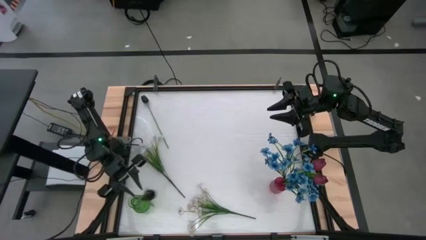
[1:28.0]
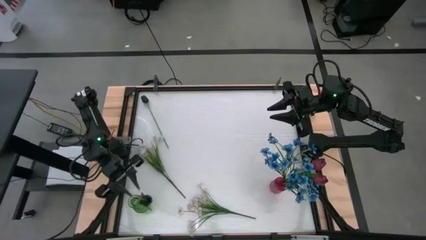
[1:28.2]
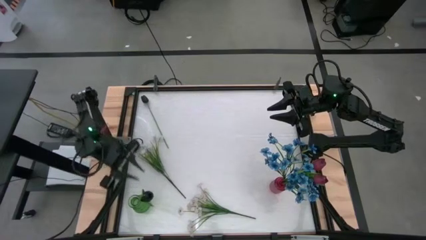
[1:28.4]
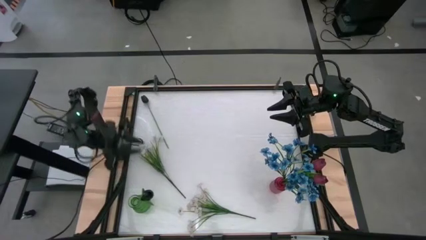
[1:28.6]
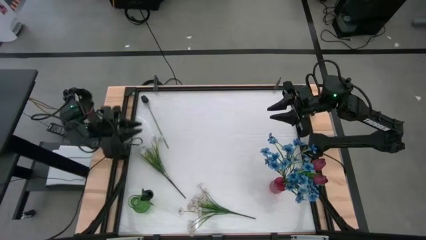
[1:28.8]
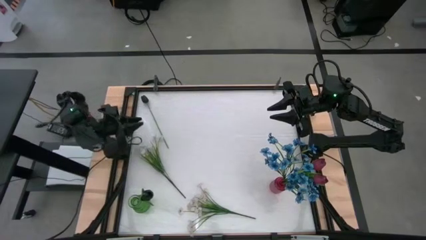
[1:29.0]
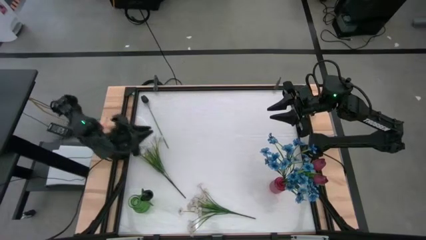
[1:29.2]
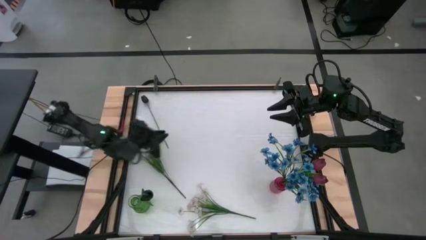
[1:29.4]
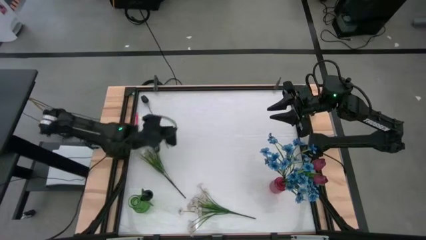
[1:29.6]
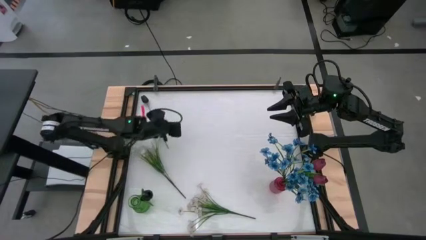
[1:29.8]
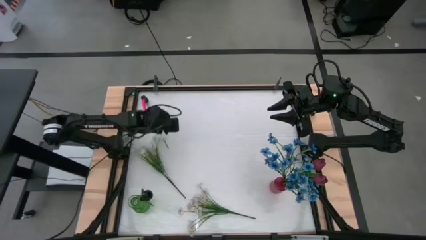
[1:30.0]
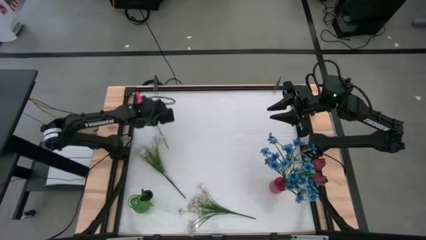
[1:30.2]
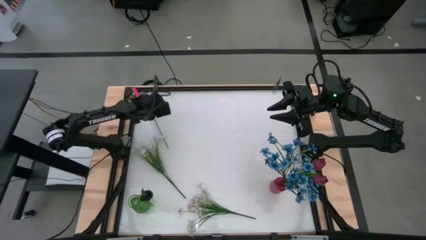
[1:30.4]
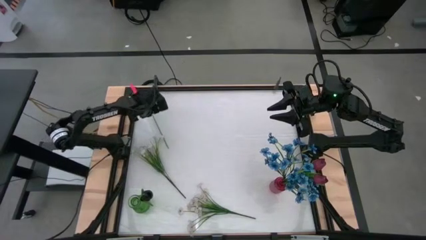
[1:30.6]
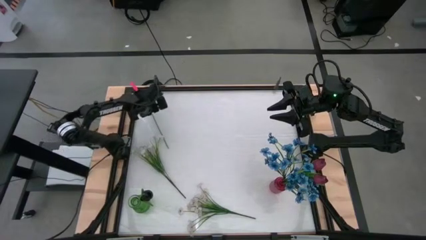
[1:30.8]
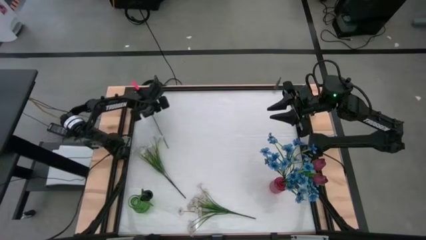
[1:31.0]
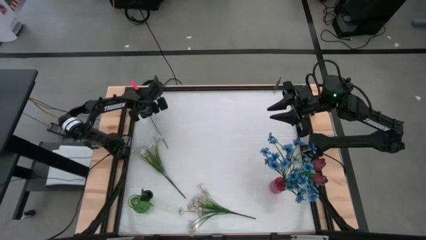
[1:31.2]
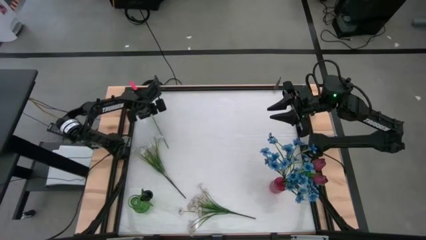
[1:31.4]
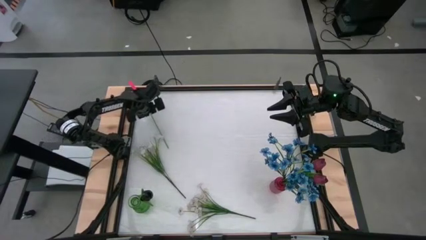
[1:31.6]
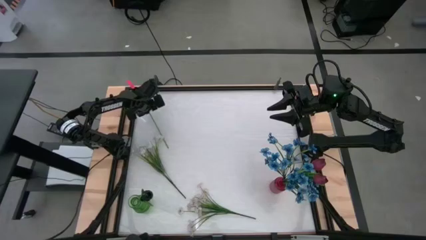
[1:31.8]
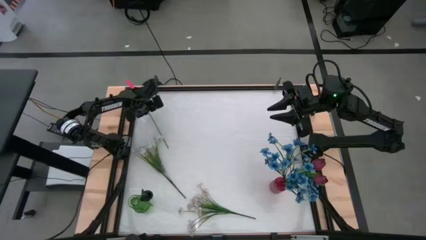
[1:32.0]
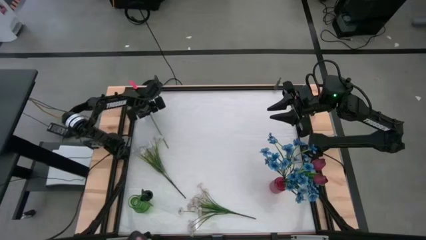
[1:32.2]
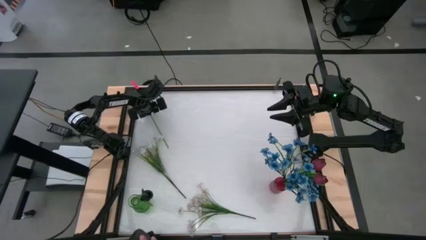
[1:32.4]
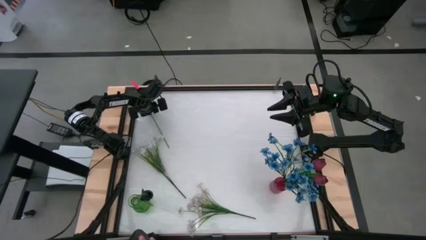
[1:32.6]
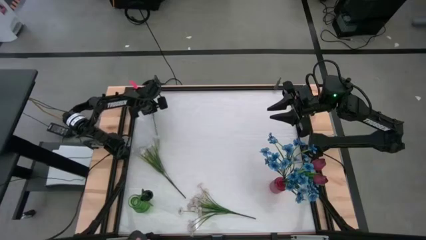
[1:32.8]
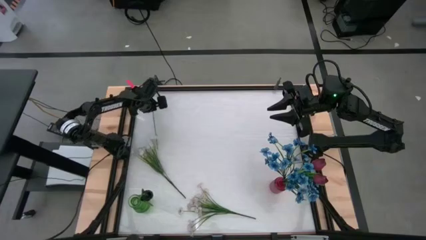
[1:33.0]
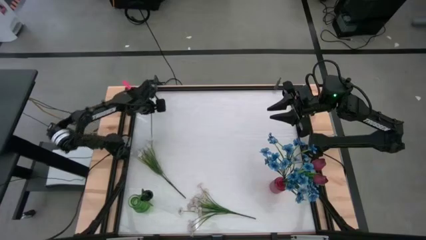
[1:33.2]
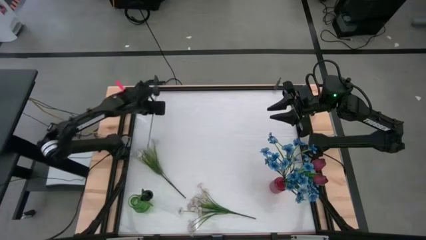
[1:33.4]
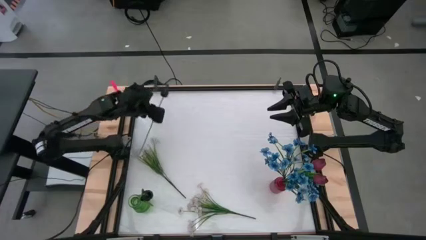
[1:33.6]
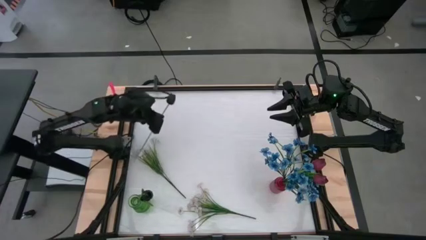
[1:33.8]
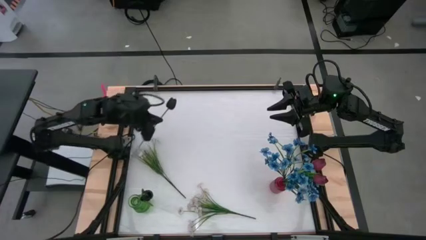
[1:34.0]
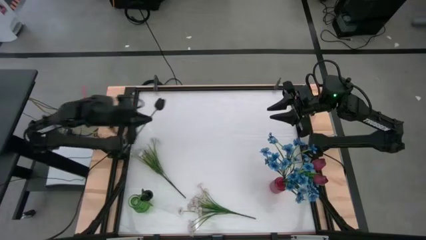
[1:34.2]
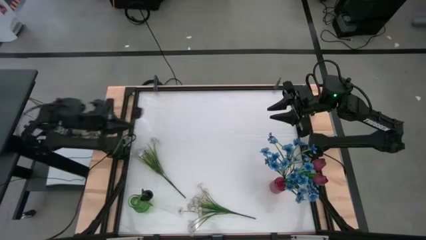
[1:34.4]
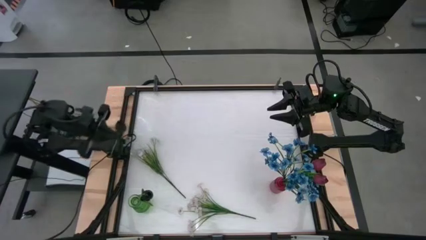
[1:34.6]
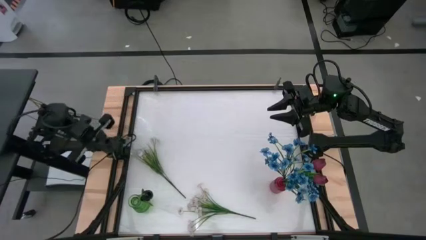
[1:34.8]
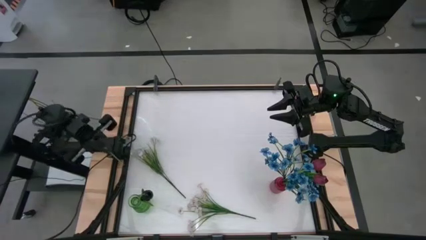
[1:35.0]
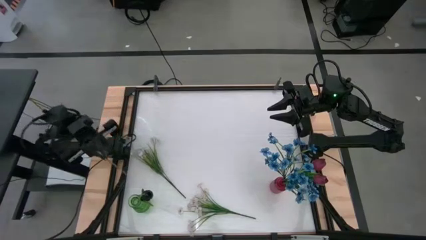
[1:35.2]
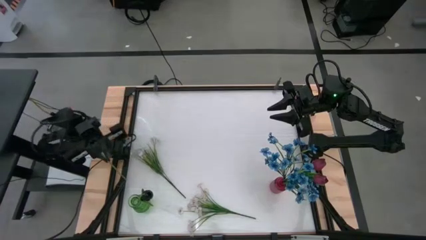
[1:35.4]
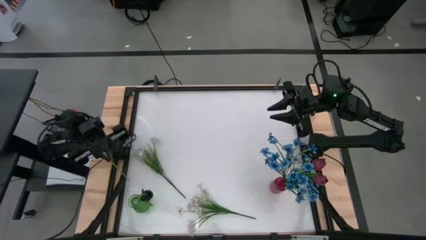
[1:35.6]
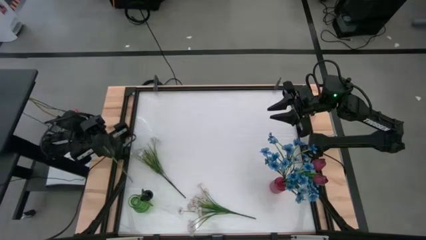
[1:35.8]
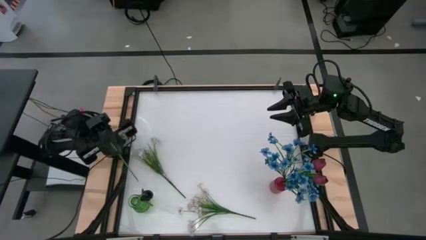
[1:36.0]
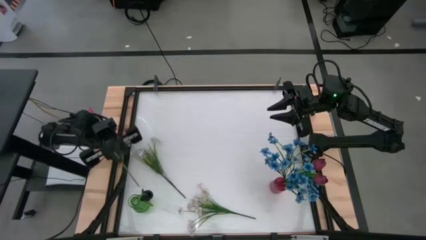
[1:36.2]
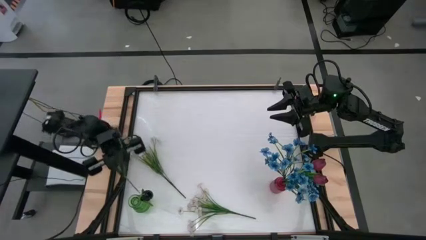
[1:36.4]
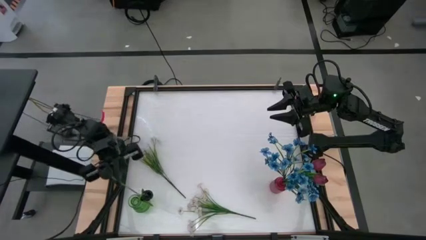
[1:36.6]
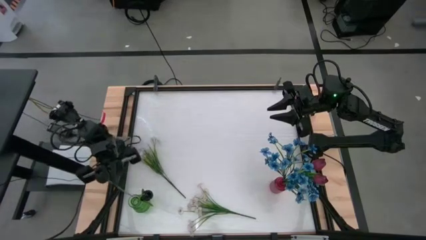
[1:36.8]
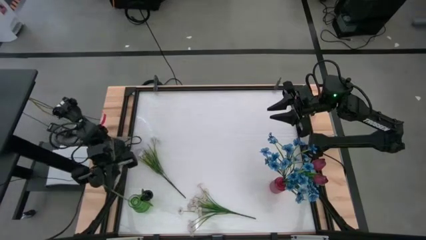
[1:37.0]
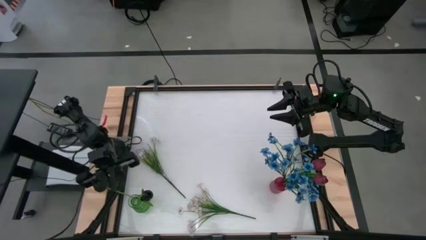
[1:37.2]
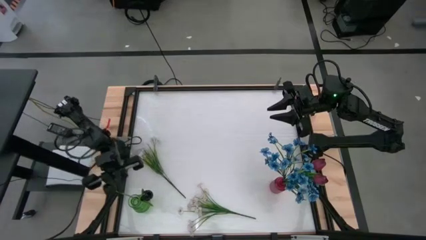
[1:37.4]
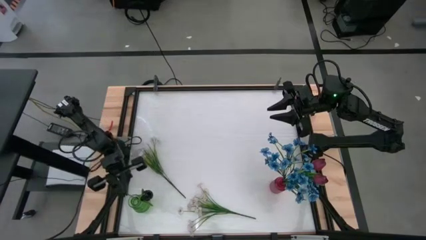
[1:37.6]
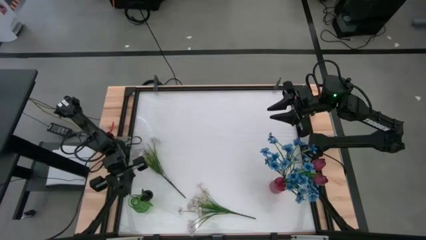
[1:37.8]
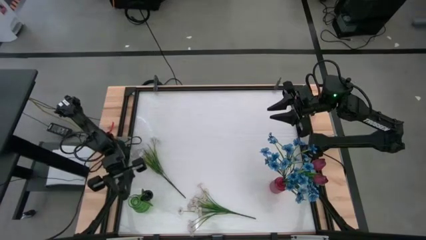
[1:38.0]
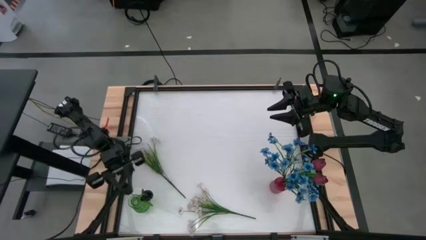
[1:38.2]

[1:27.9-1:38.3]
Task: Sort flowers into vase by color
Put the black tulip flower into the green flower vase

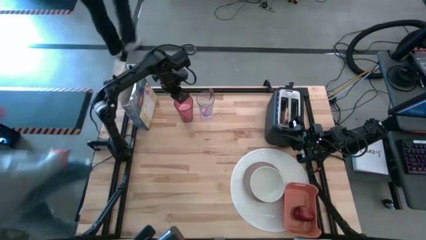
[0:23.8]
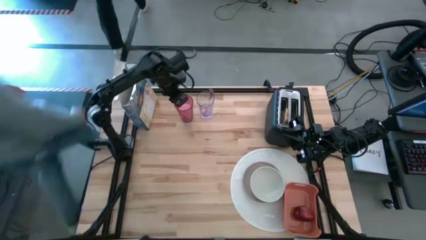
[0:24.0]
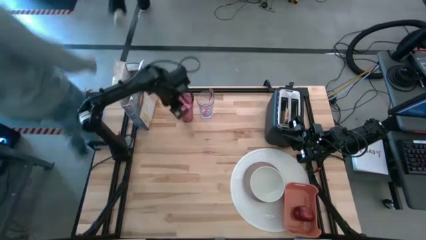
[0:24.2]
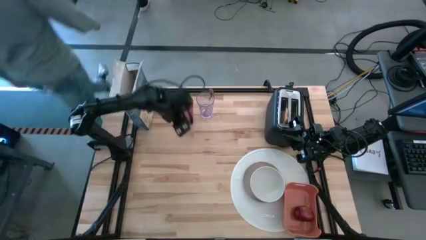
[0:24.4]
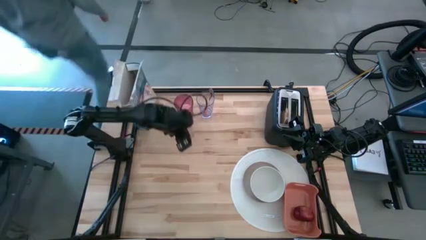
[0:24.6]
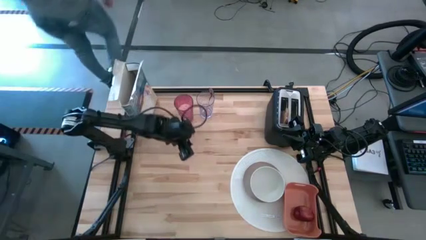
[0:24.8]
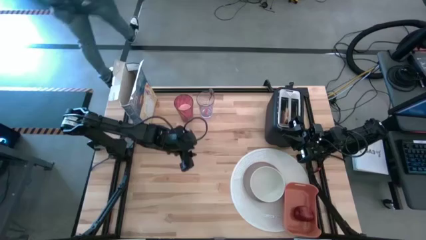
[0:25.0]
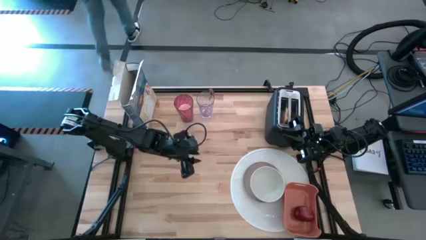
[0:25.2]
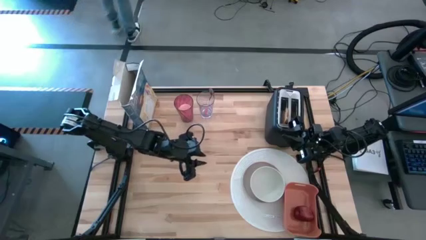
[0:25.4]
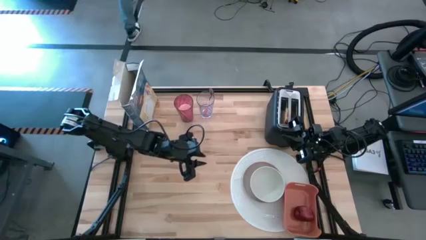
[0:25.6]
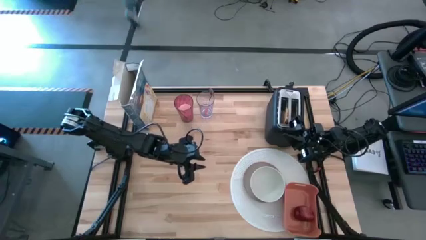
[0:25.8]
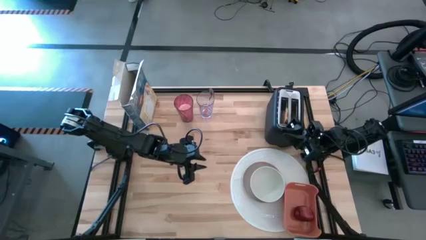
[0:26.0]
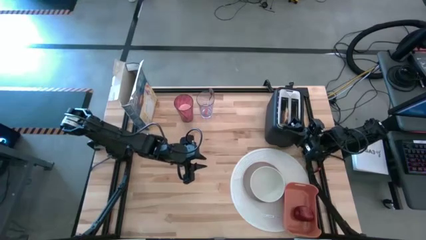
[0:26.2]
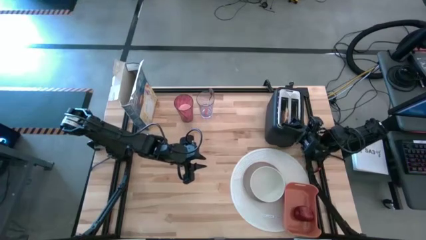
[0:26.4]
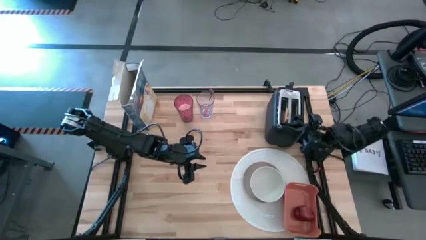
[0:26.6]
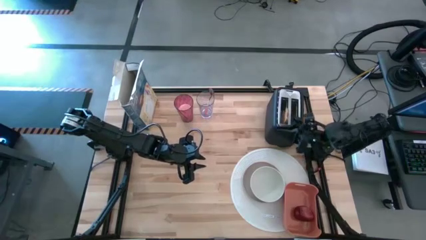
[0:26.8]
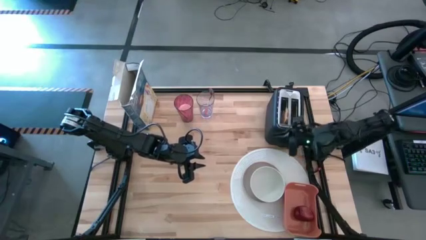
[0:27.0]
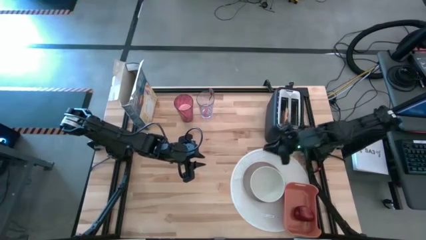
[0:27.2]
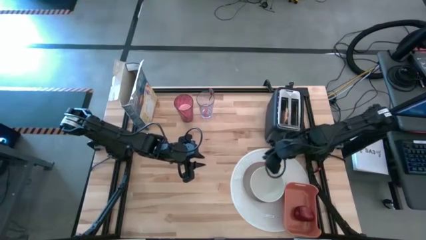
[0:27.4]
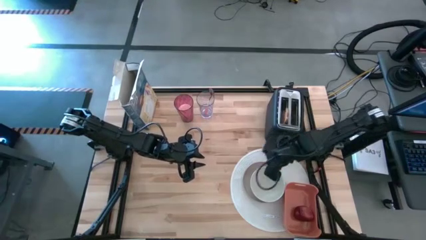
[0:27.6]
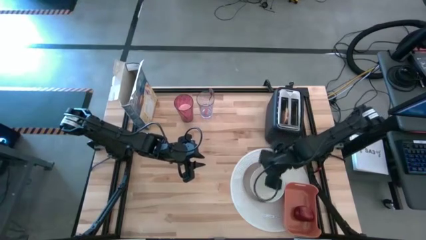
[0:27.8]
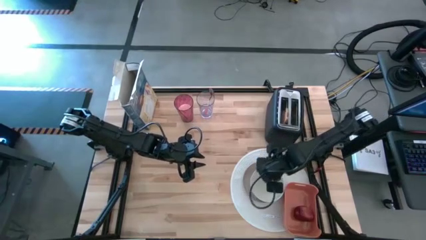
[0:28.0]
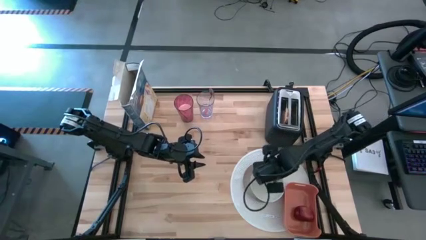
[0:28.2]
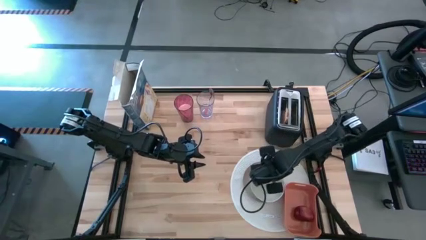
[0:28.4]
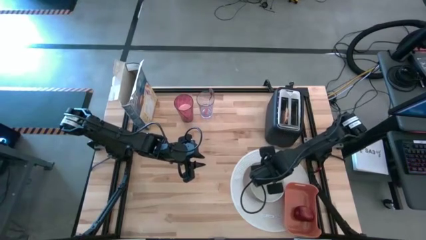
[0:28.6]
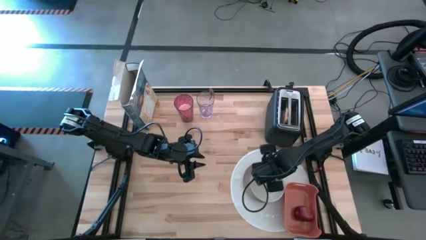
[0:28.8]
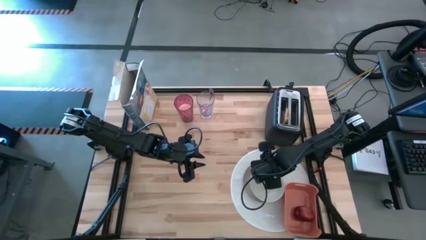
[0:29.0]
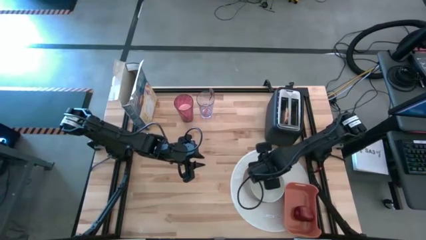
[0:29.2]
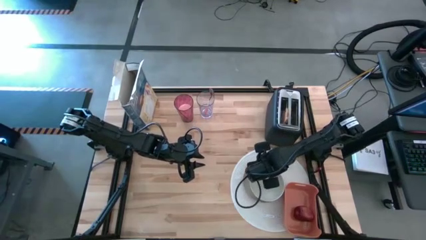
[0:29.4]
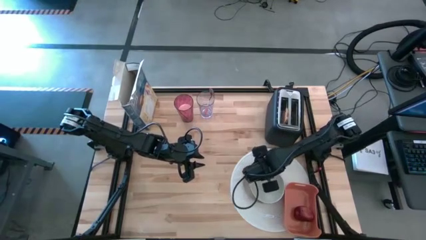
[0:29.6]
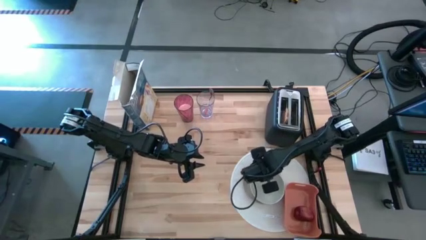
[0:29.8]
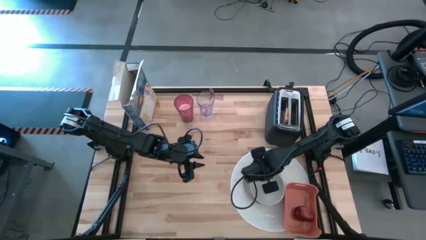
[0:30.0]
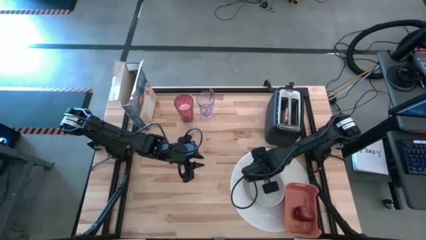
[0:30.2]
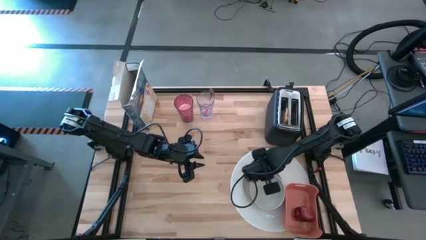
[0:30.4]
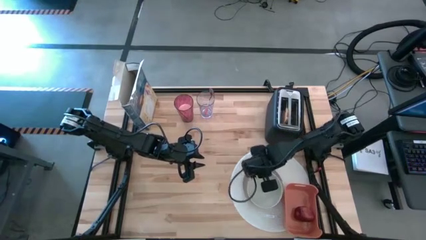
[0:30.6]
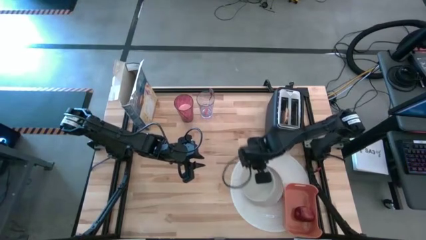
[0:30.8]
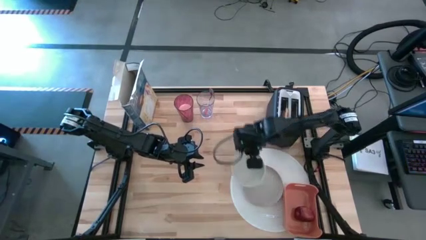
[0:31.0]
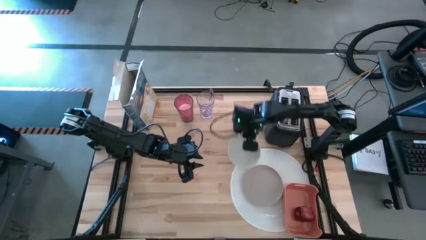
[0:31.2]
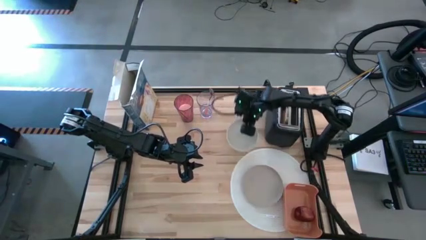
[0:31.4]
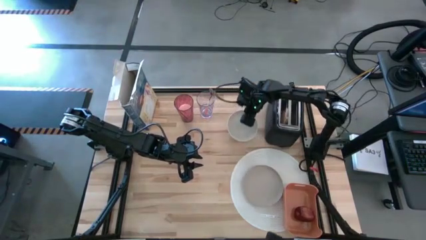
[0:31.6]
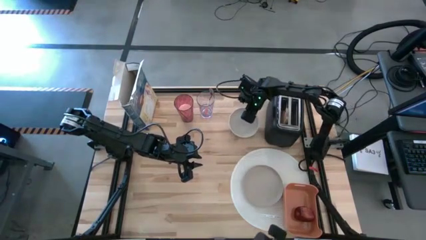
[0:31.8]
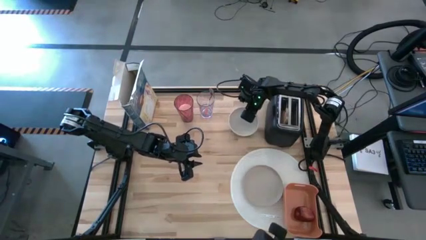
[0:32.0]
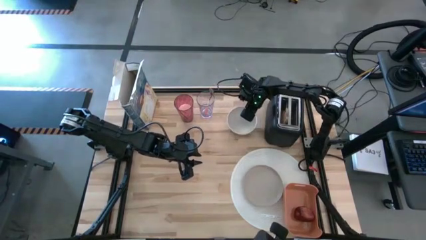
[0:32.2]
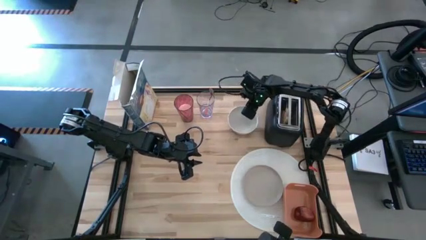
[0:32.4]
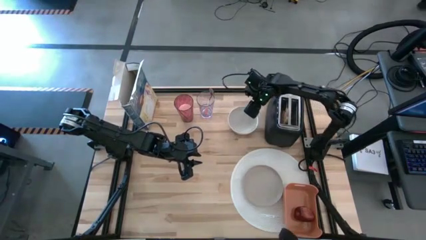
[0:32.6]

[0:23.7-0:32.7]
Task: Arrange a breakfast setting
Remove the white bowl from the peach plate
